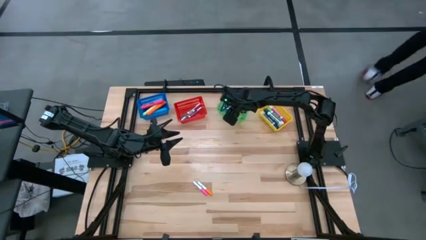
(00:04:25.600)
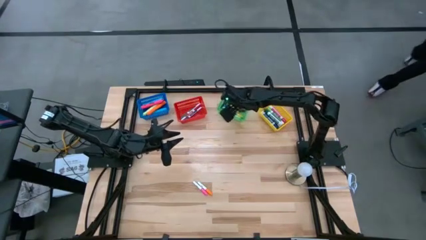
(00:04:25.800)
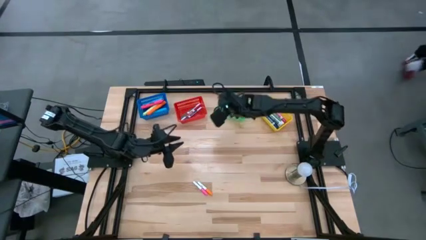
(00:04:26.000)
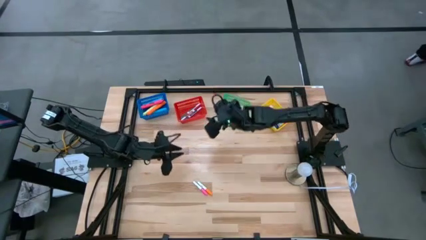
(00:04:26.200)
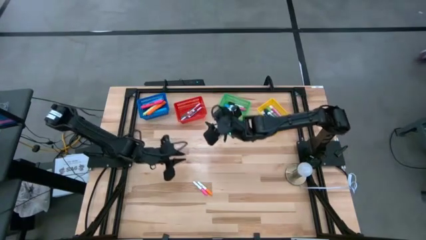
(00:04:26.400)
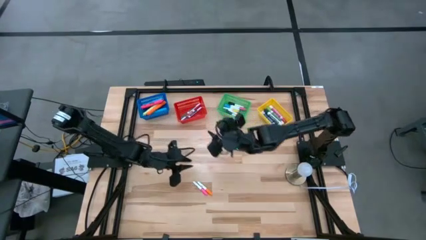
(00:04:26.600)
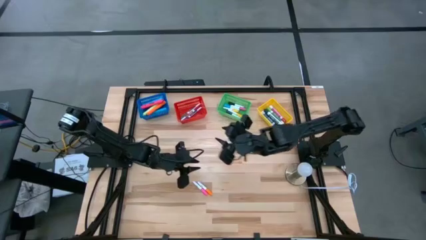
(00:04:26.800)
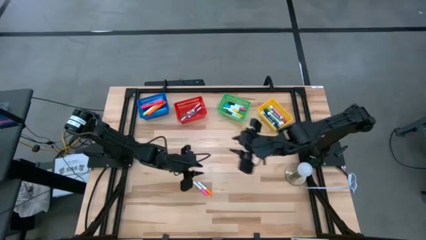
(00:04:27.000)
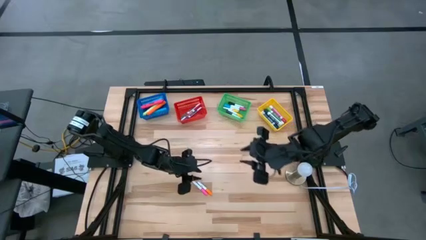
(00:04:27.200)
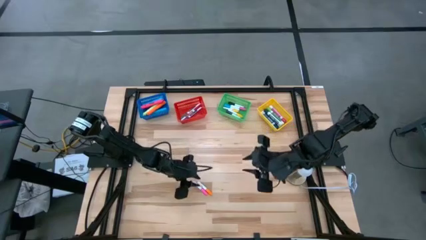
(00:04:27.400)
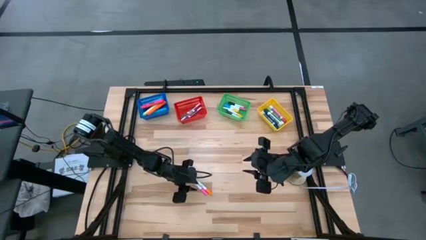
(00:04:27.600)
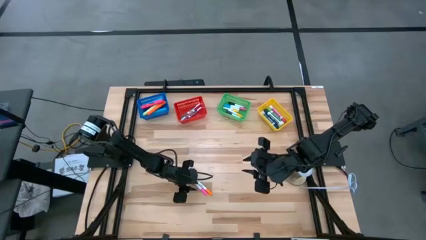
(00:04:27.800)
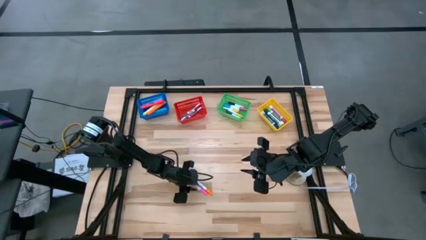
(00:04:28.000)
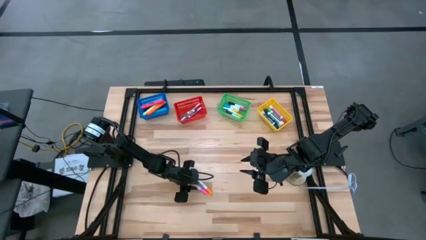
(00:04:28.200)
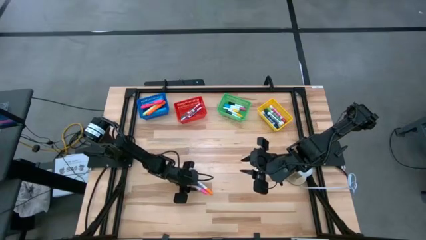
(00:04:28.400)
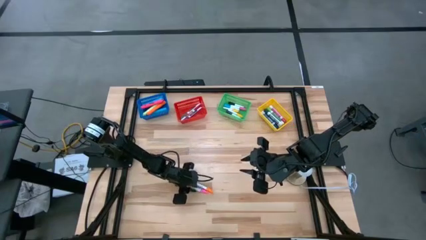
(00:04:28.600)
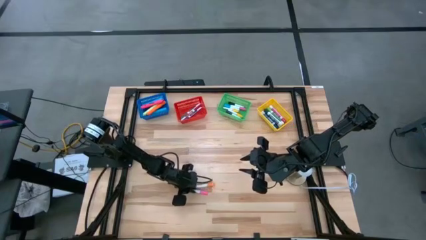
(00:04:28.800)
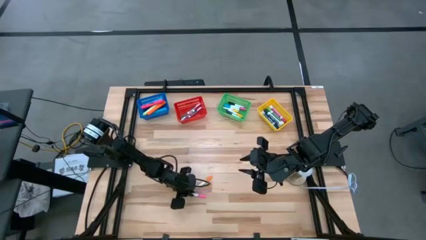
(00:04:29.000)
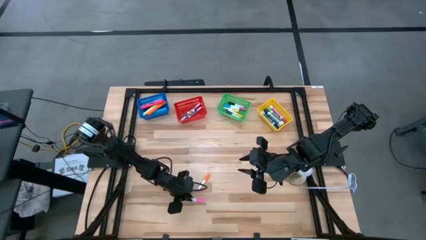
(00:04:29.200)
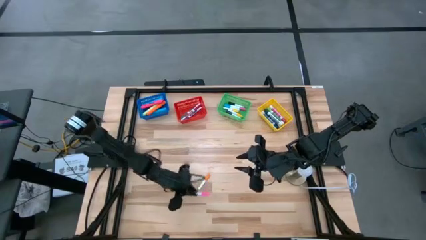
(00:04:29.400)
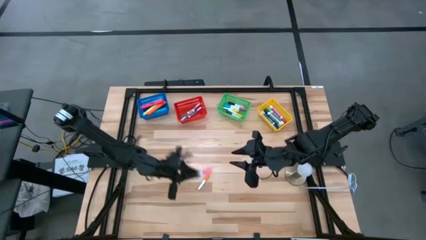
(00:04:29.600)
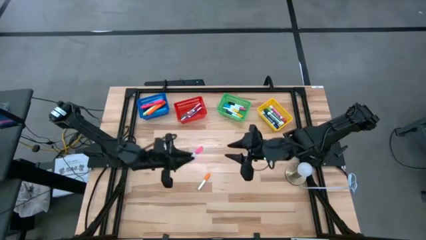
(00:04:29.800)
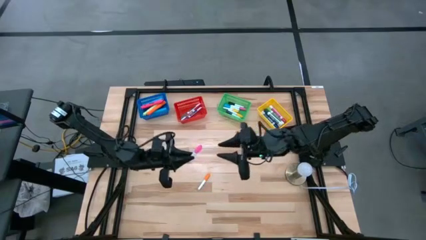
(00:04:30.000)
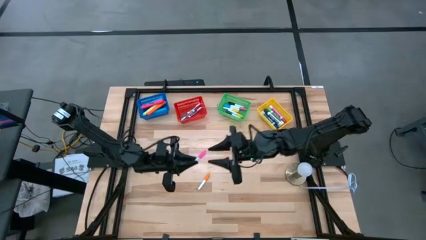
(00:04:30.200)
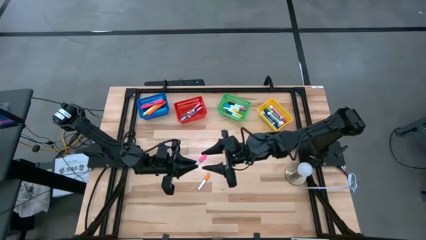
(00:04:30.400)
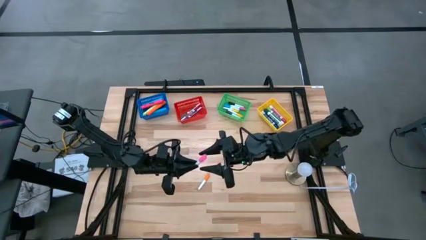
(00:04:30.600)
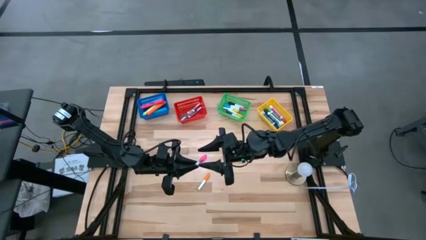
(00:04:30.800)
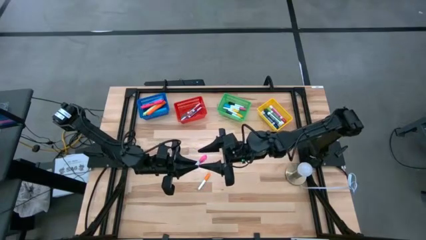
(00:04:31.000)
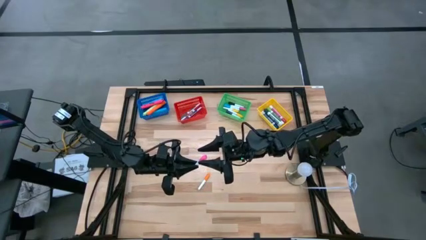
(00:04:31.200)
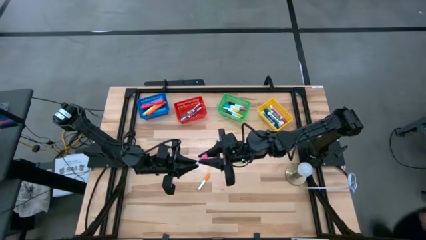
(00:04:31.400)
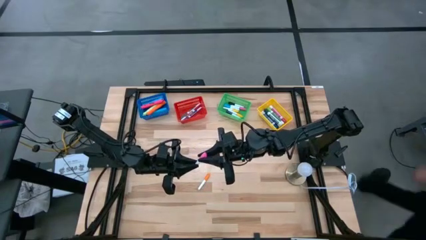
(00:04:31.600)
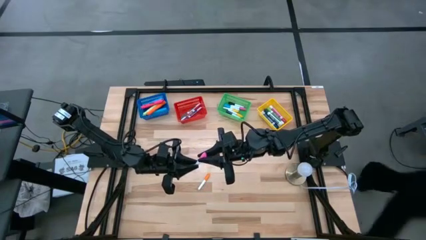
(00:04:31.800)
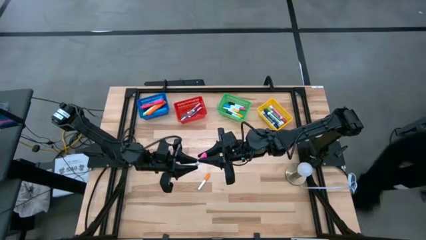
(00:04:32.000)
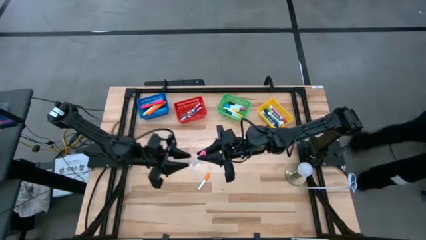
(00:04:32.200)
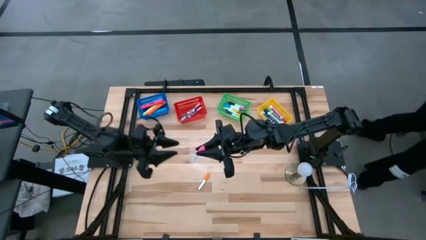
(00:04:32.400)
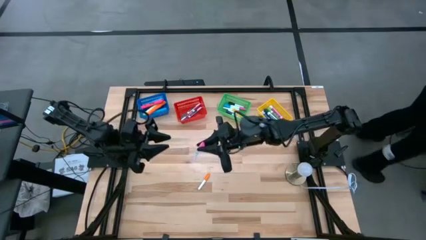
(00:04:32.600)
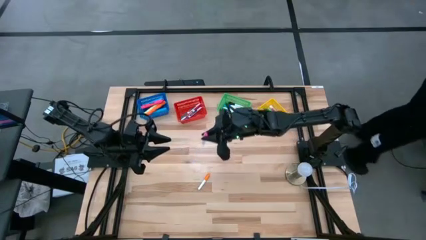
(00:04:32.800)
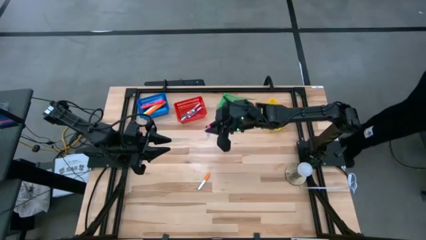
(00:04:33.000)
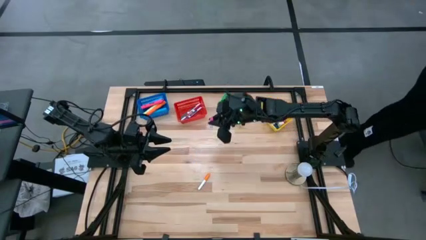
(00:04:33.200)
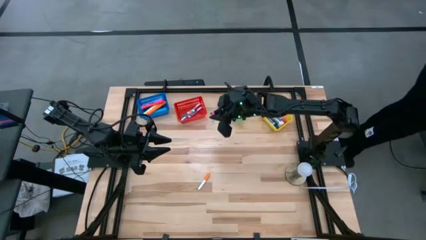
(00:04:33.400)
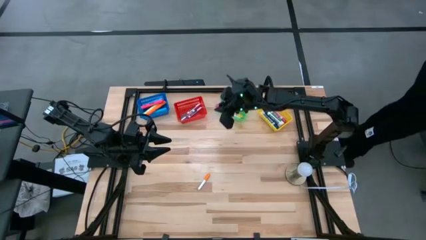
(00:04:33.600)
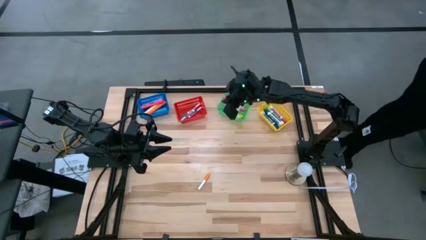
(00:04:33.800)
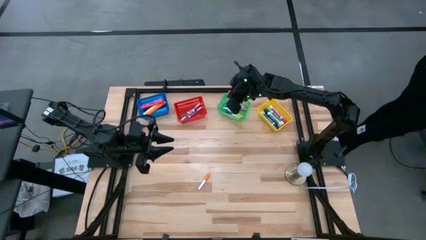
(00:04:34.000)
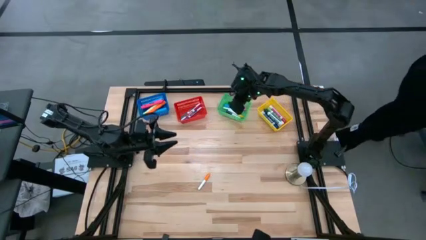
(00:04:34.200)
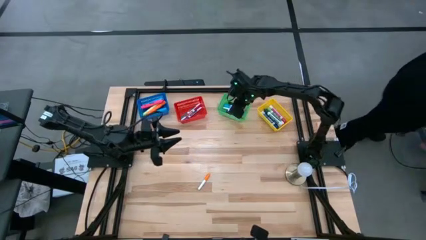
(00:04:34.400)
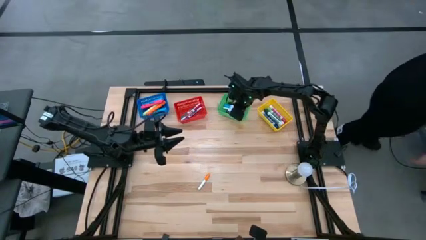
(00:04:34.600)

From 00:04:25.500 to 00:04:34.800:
Task: Pick & Place Markers
Put the small pink highlighter pen into the green bin

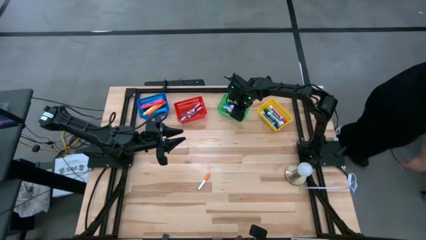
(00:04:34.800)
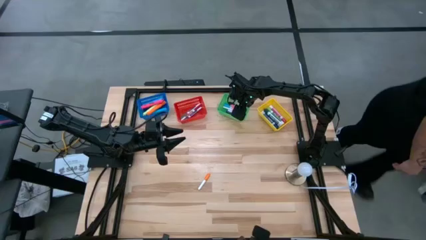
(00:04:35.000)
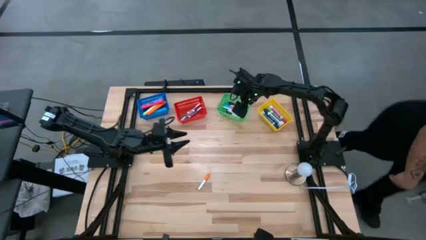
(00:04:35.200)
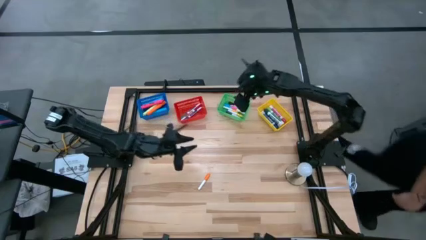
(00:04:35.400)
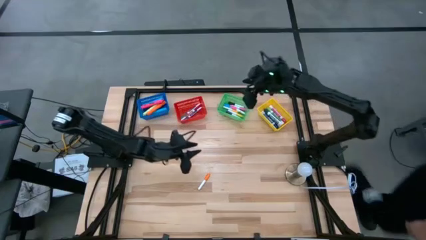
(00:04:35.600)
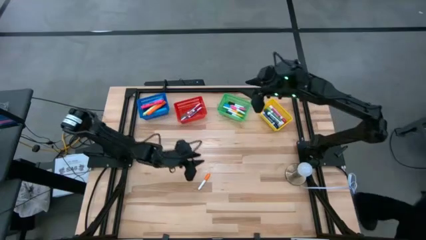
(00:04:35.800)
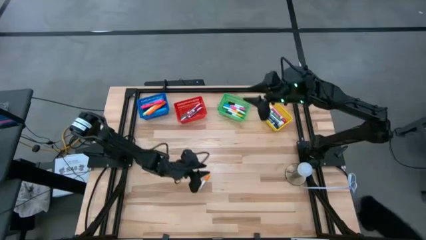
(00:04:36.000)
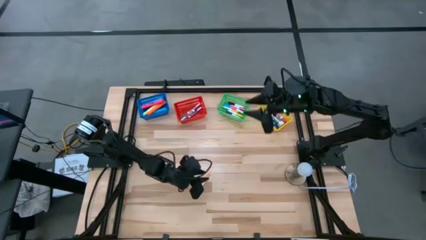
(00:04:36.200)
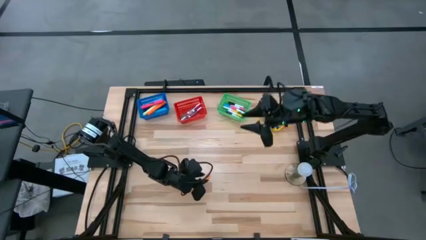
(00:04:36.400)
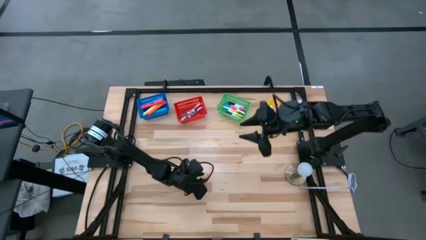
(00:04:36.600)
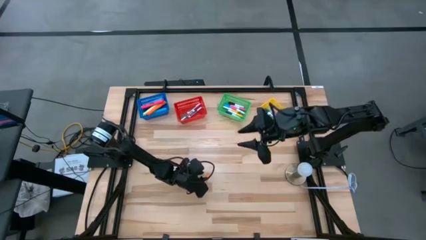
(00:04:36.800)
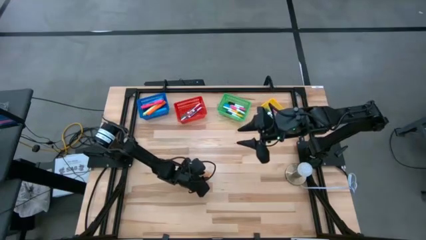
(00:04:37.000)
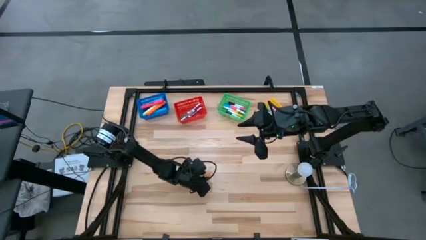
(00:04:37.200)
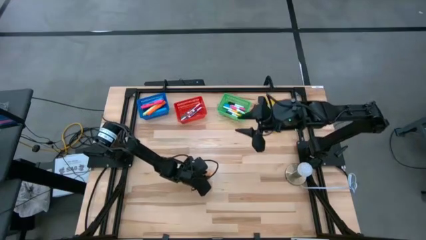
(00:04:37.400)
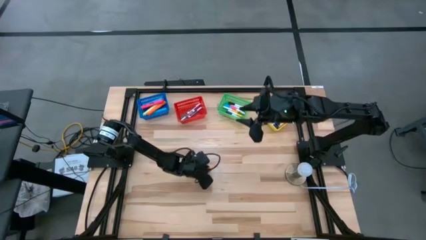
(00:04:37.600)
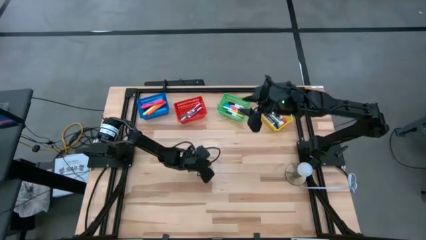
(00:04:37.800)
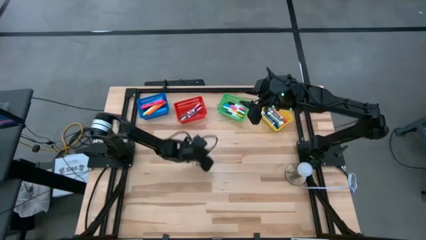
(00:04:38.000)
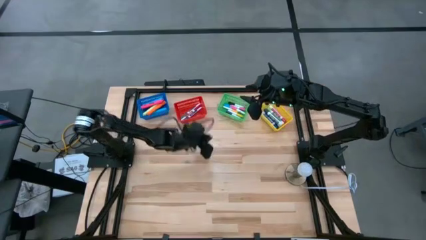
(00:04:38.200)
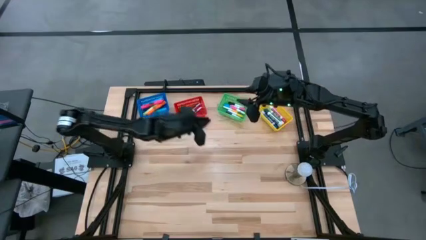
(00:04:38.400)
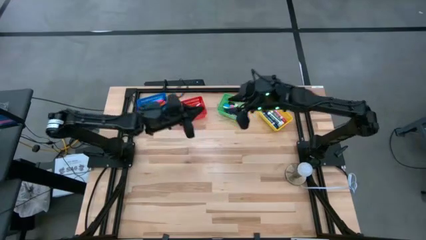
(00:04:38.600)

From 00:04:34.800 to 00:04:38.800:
Put the small orange highlighter pen into the green bin

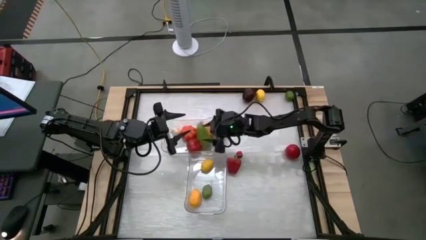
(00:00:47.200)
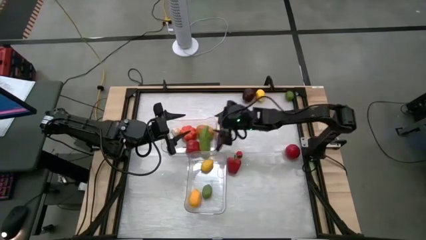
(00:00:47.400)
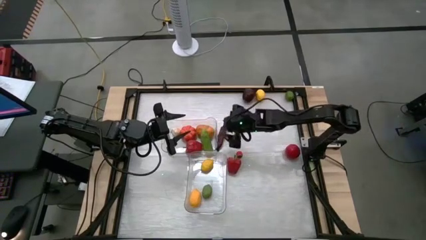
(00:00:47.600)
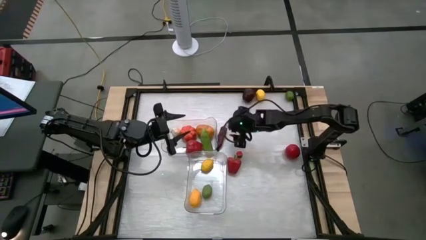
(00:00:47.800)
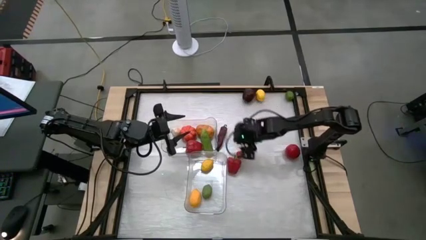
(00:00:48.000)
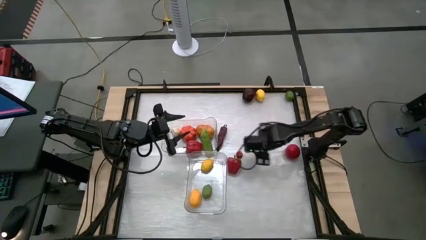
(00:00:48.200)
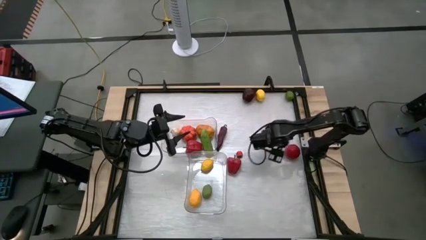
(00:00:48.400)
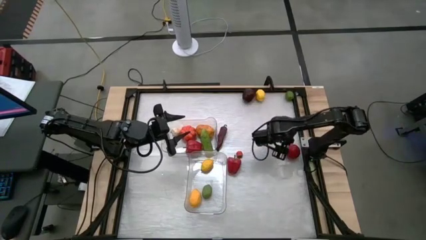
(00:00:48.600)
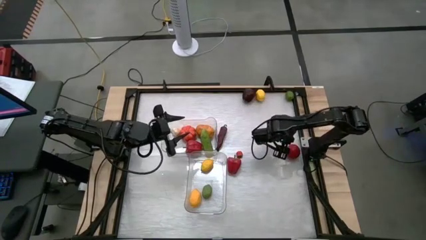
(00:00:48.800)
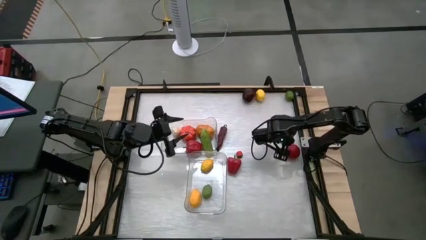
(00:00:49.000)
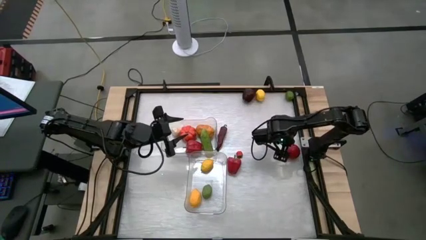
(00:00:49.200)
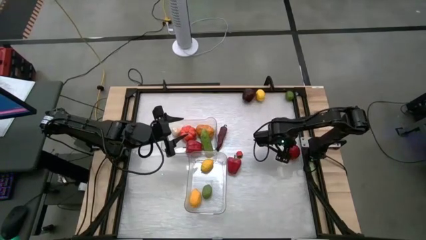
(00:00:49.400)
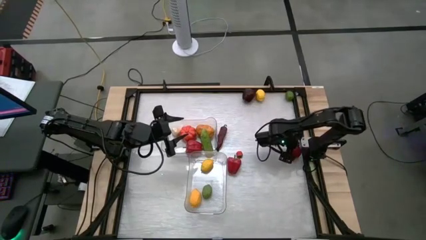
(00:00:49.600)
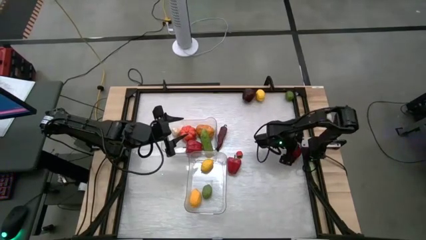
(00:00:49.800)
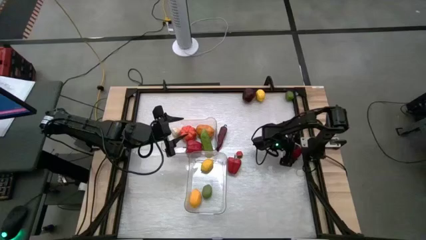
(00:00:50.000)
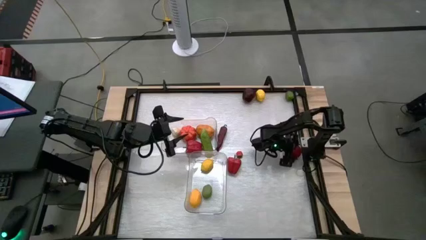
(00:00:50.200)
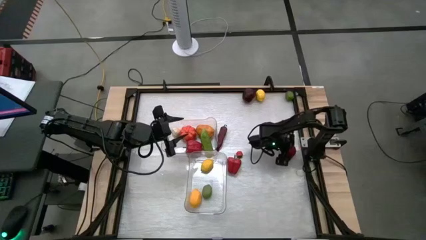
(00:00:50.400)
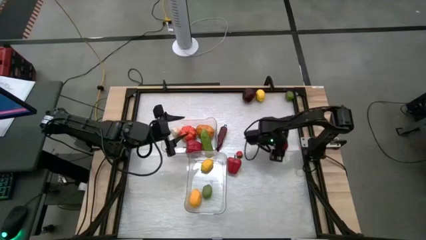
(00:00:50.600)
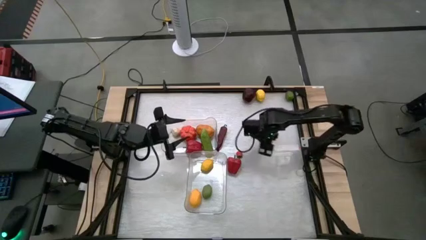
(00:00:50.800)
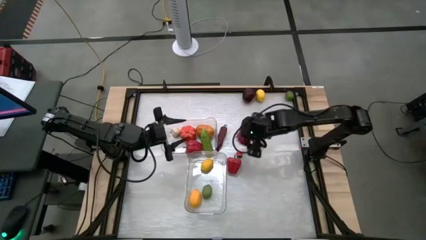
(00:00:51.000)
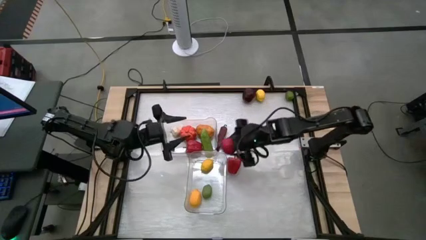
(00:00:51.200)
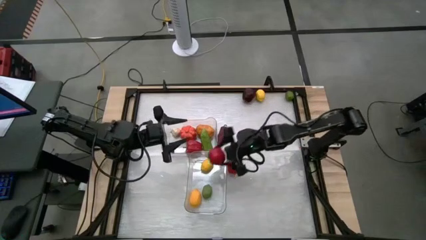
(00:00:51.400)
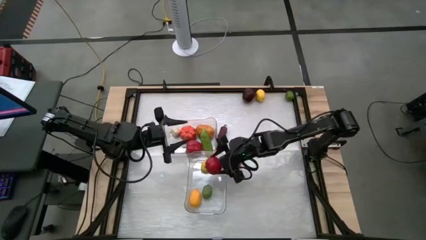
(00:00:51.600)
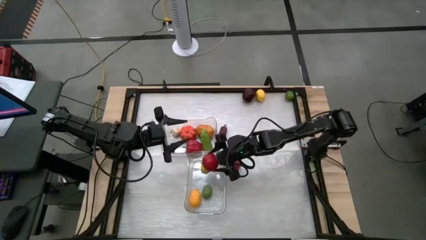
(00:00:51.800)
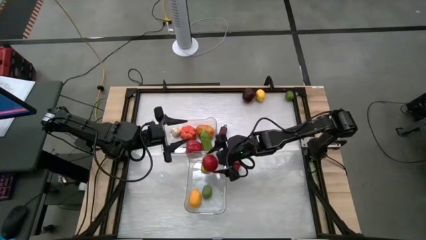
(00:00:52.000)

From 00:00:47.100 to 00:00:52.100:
Task: Sort produce into baskets
Put the right tomato into the bottom transparent bin
